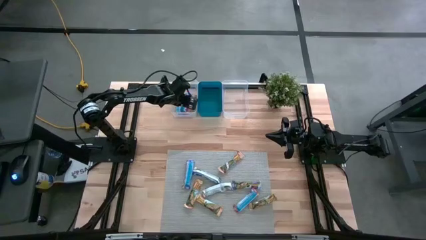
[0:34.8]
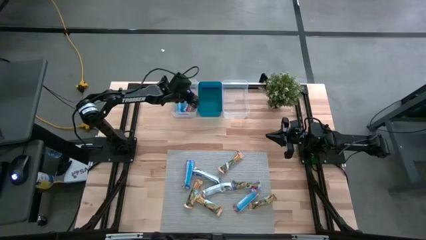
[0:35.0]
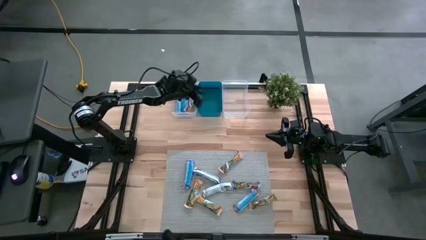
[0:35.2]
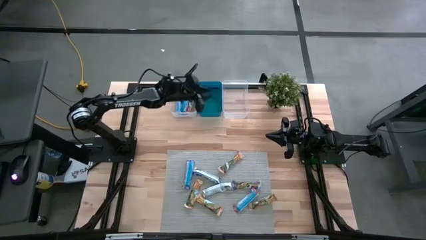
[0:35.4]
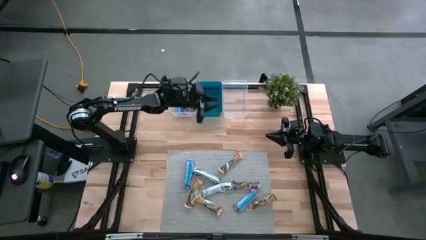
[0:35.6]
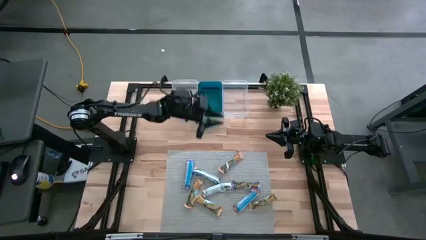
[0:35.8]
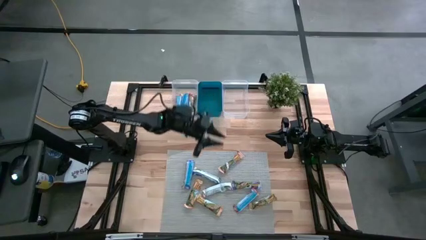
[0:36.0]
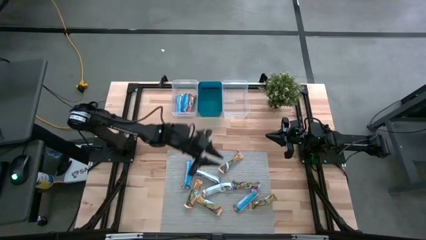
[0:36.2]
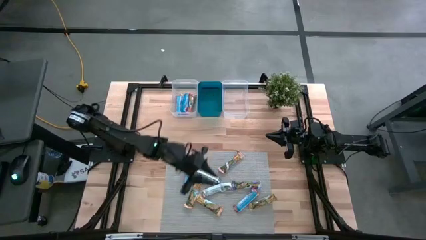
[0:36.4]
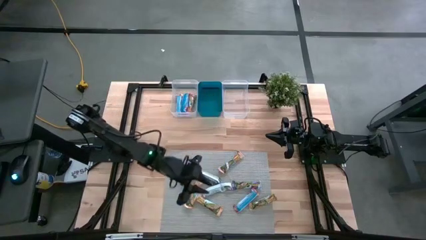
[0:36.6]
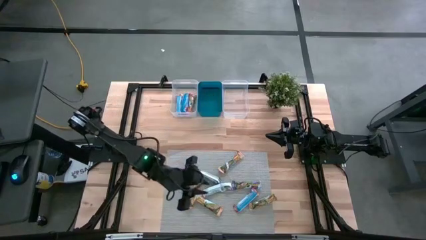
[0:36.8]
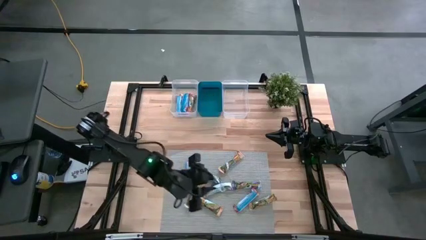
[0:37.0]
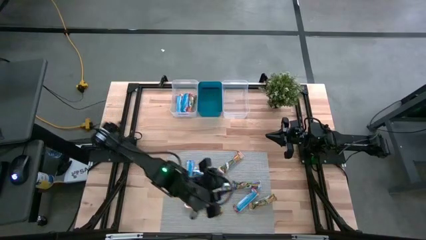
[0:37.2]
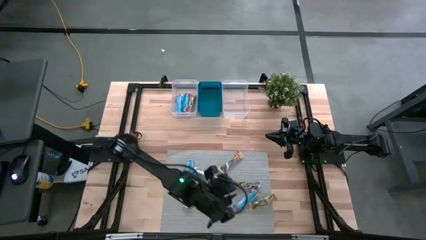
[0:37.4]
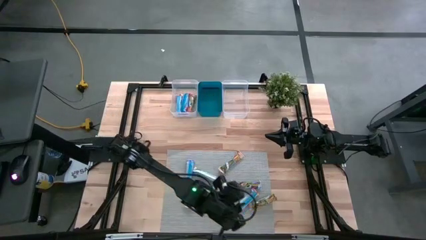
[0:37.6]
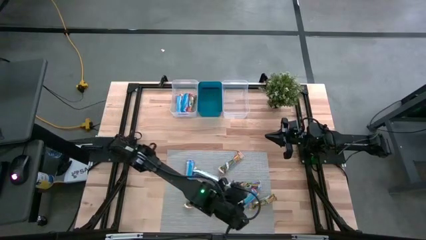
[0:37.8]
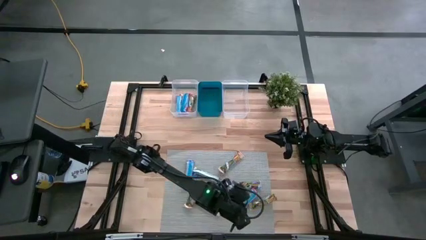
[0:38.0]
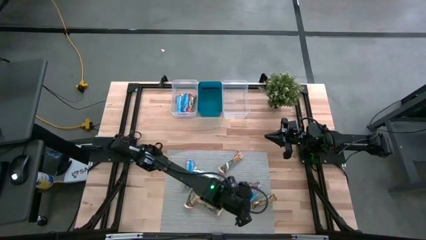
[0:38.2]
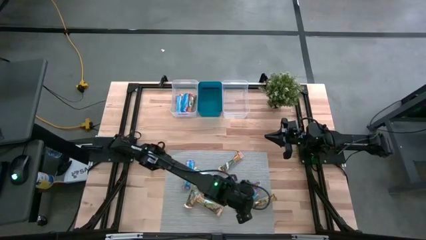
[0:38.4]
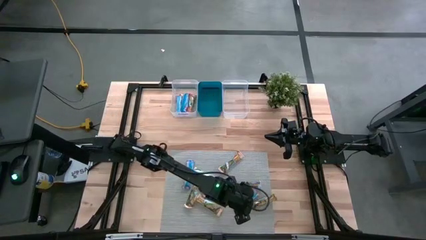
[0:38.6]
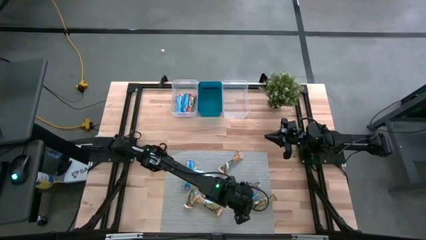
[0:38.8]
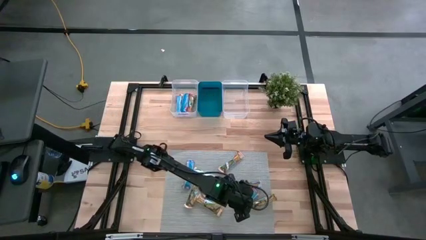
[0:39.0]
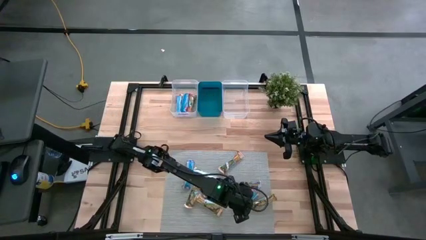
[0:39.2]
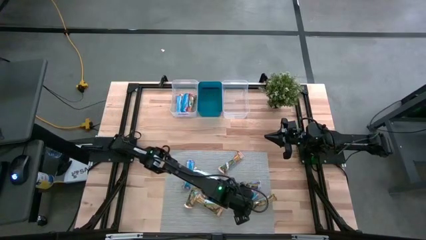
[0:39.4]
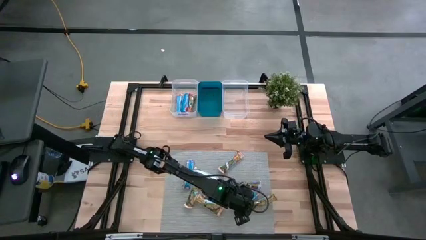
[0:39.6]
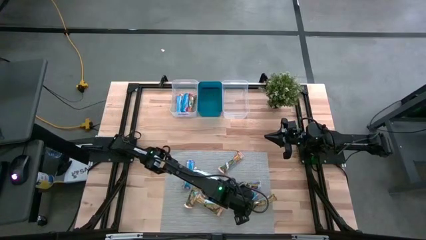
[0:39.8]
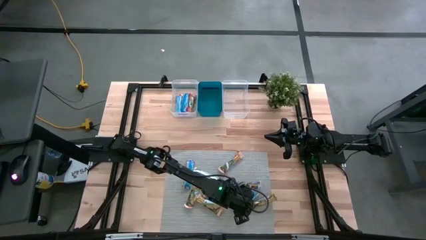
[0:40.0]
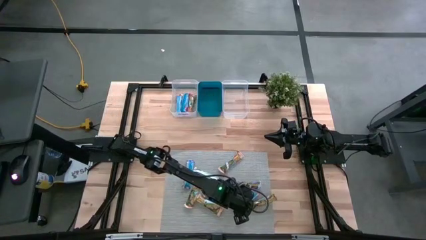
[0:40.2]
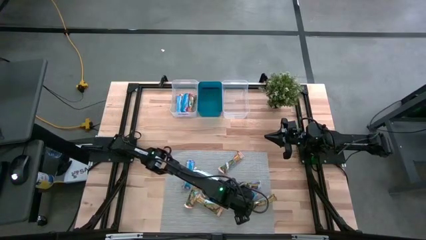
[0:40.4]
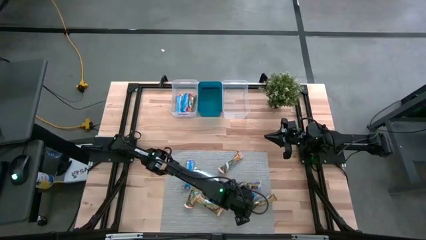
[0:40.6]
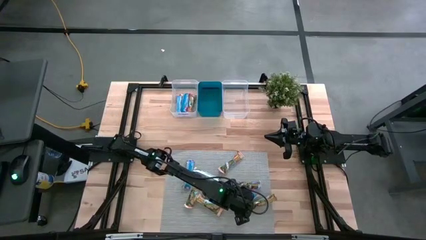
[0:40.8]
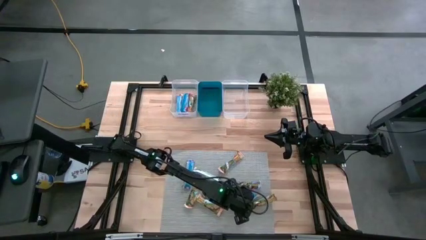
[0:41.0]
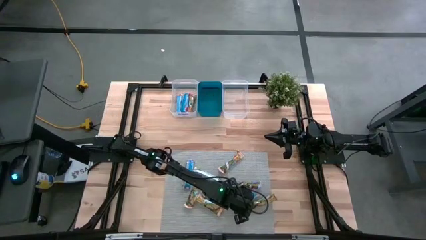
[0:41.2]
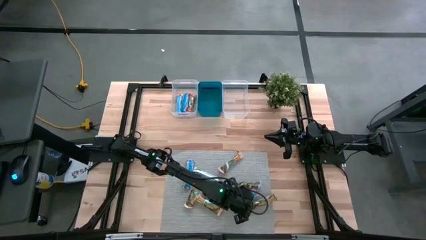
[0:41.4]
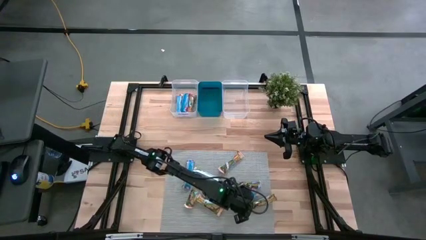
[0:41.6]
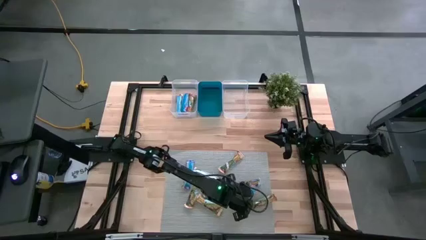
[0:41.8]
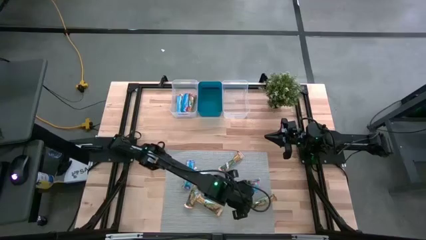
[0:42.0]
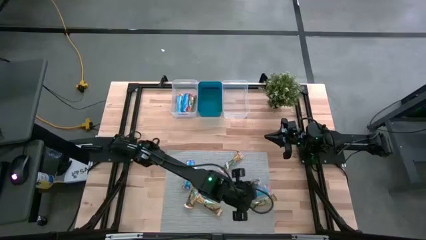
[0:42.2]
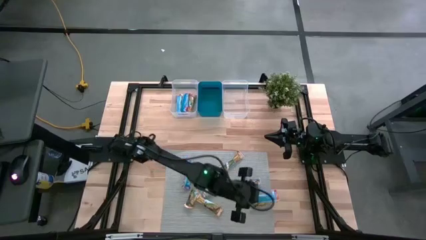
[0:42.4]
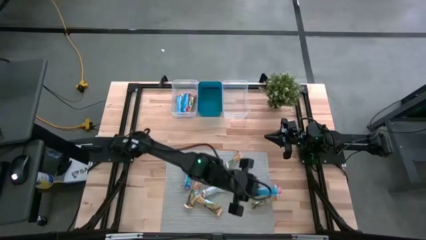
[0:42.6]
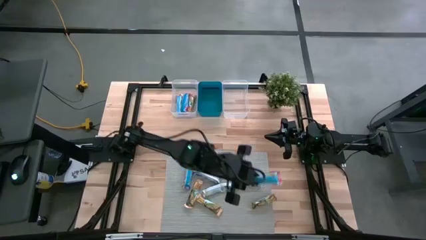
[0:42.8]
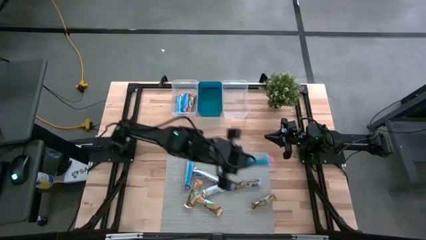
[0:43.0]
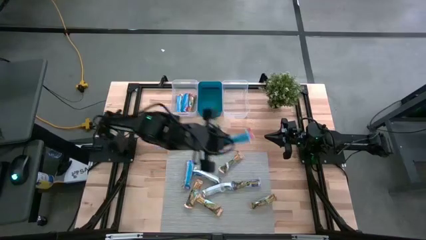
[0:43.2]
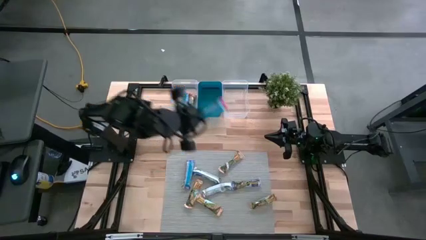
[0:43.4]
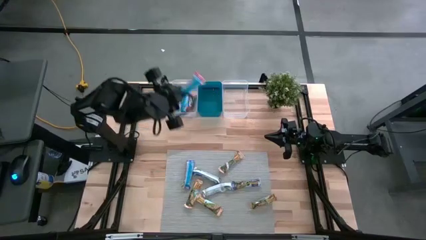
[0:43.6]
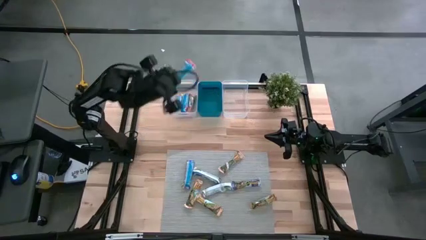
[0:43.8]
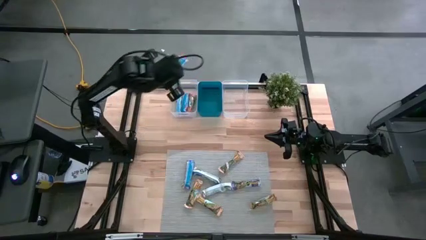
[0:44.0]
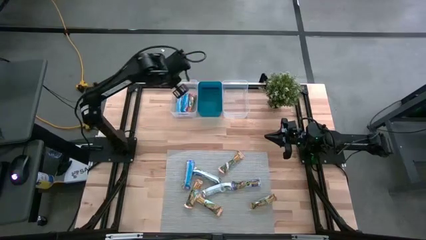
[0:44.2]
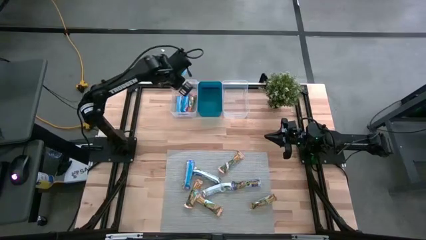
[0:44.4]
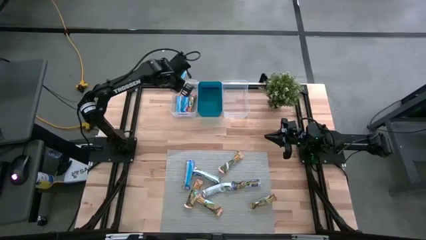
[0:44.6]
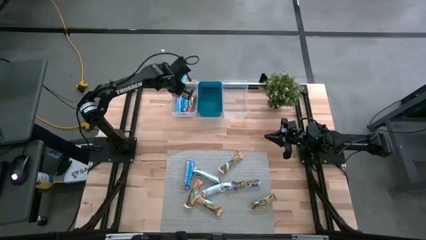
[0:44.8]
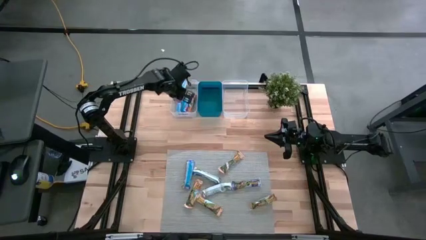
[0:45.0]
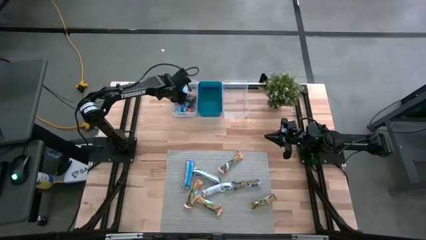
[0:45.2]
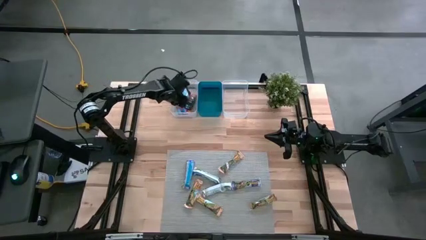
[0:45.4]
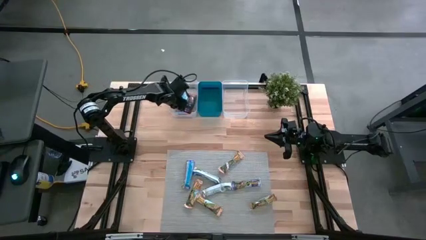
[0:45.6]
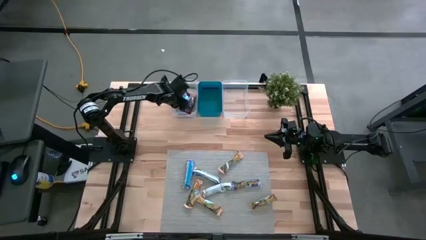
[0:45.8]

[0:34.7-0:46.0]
Task: Pick and place Granola Bars by type
Put the red granola bar into the left transparent bin

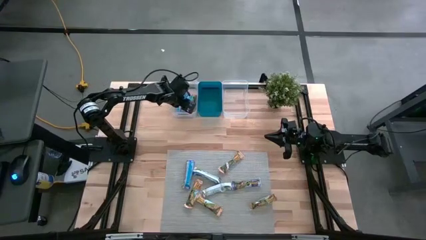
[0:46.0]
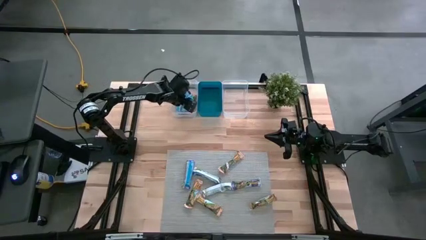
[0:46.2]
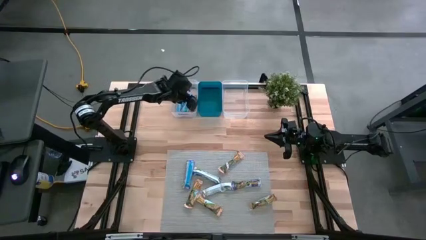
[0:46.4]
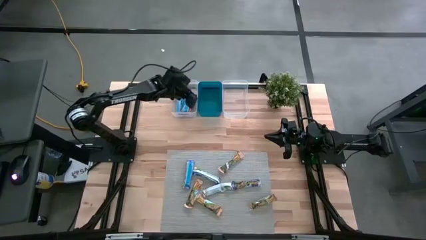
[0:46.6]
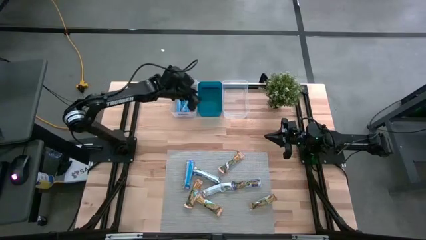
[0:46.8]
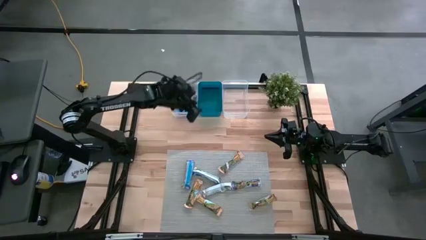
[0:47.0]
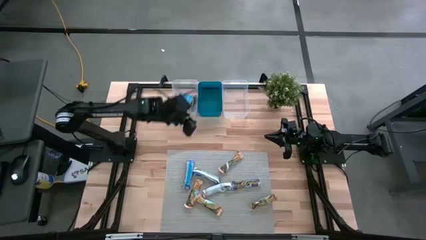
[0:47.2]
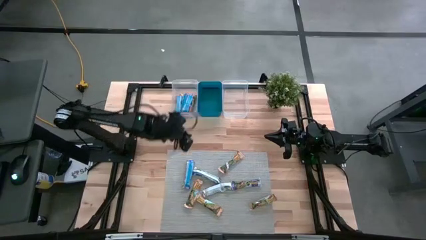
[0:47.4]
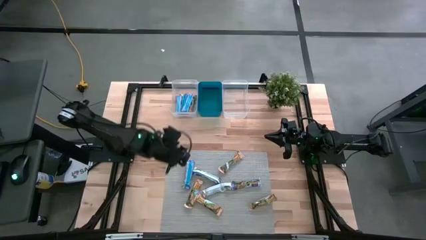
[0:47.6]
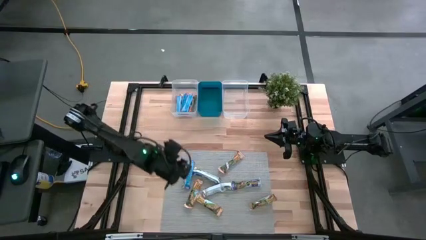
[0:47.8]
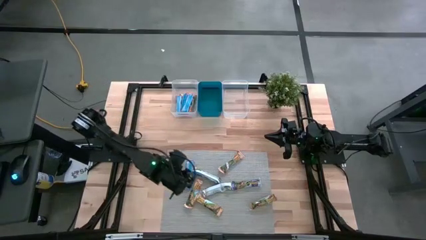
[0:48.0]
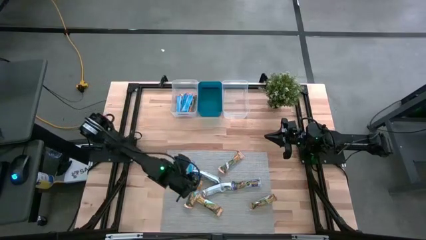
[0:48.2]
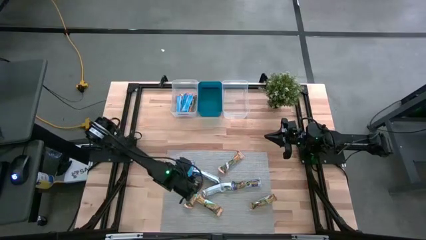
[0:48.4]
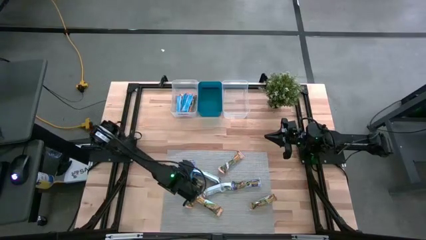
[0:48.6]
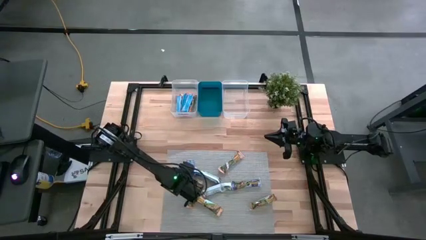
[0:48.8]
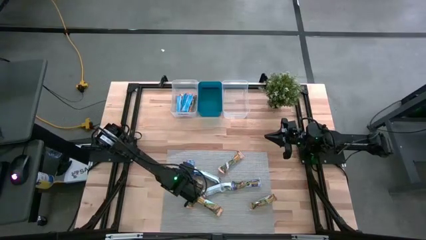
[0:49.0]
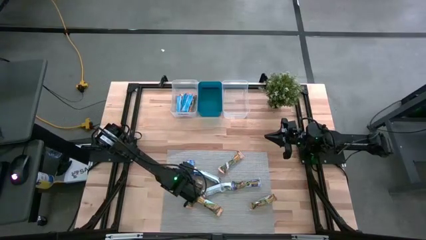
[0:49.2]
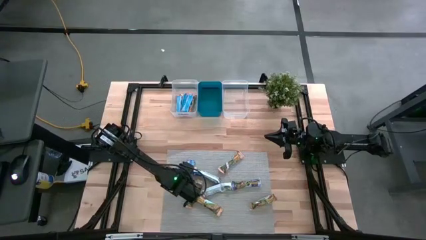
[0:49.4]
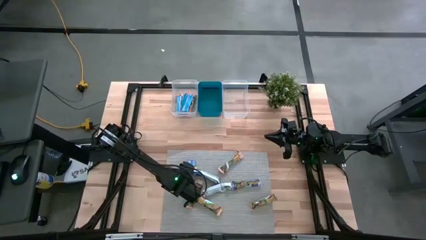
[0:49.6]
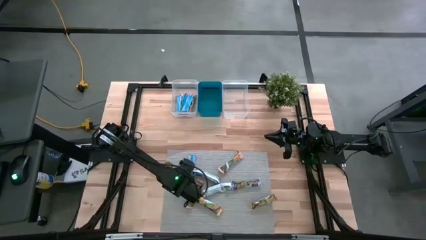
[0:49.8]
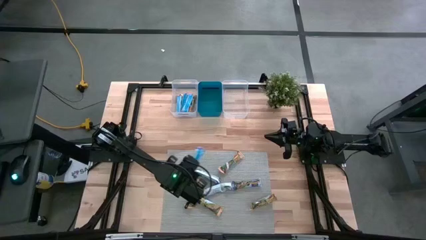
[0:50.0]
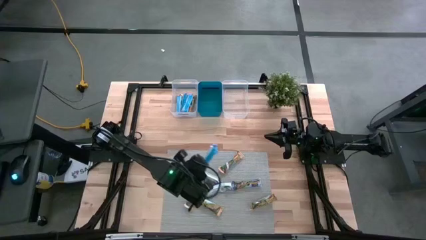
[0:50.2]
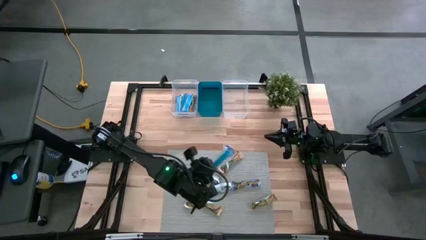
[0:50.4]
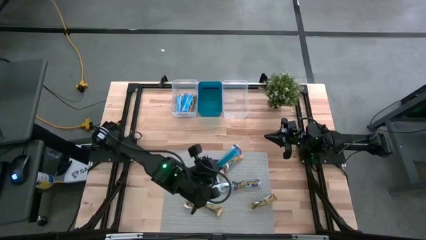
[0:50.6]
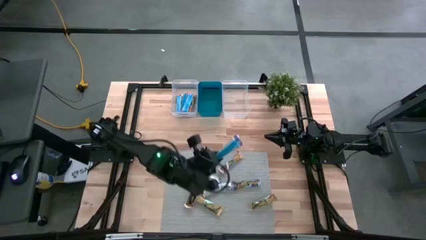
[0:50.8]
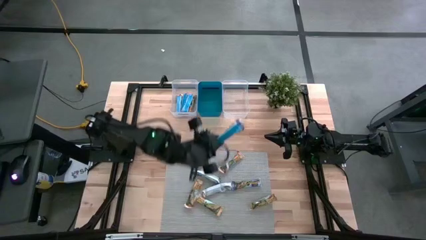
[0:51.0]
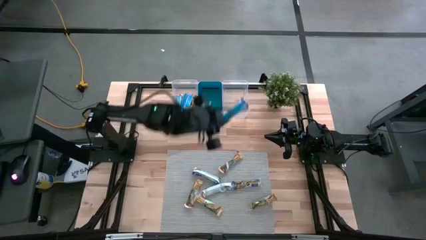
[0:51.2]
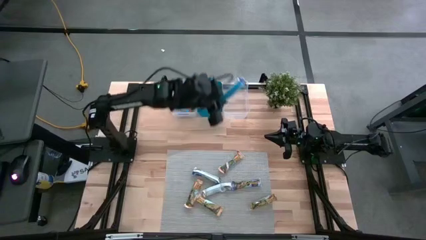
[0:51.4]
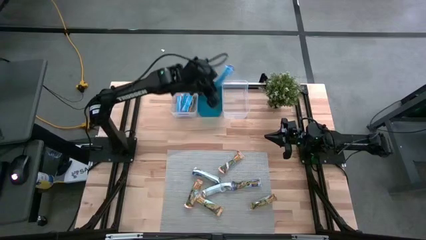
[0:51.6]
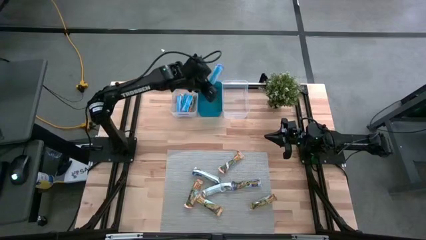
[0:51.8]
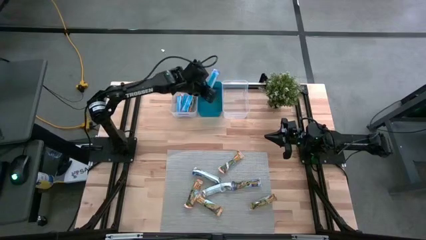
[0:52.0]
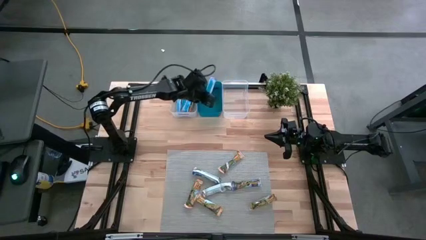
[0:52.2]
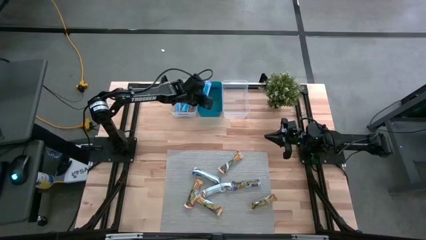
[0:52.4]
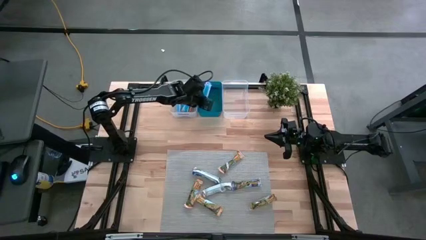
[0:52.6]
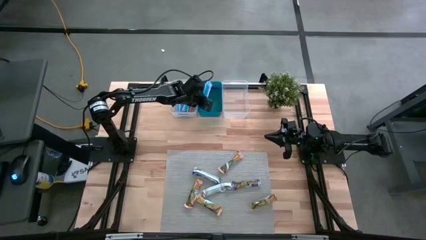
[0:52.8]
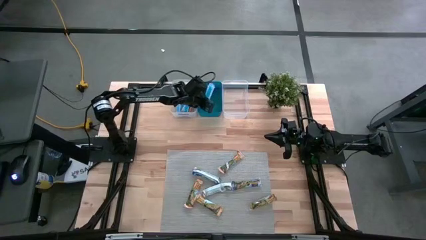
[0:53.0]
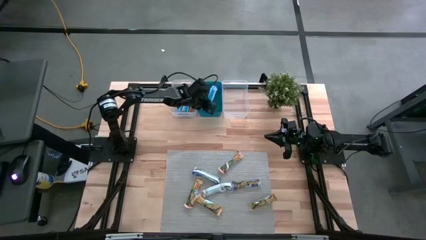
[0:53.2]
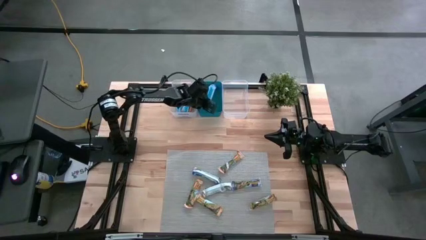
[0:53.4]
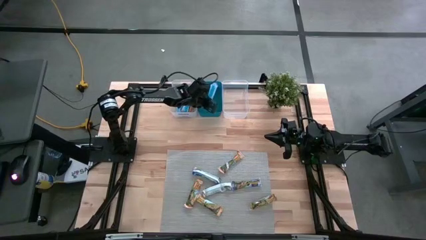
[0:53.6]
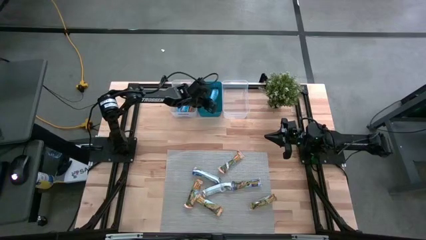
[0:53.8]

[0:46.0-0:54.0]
Put the blue granola bar into the blue bin
